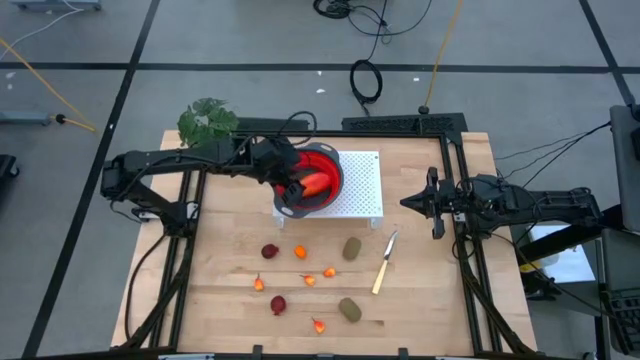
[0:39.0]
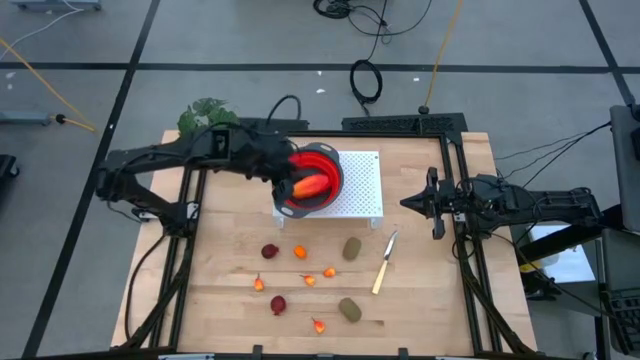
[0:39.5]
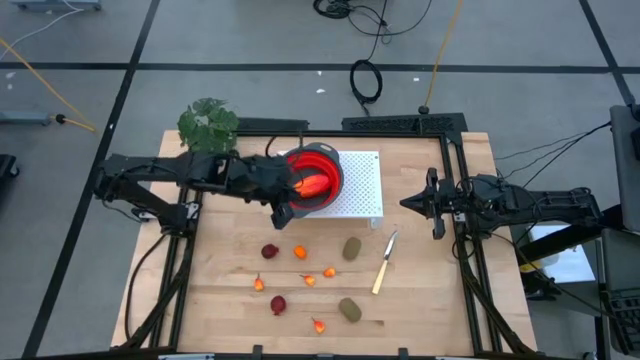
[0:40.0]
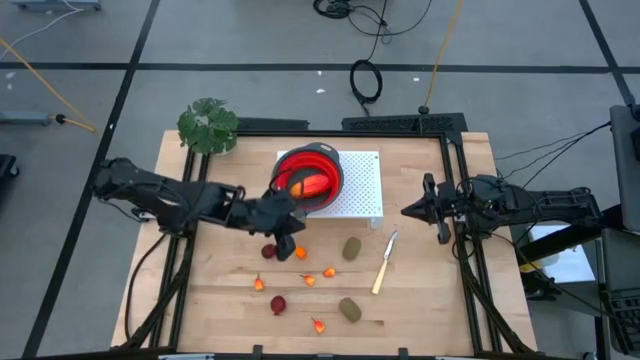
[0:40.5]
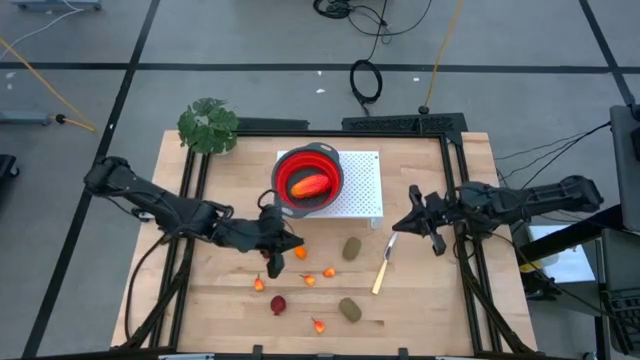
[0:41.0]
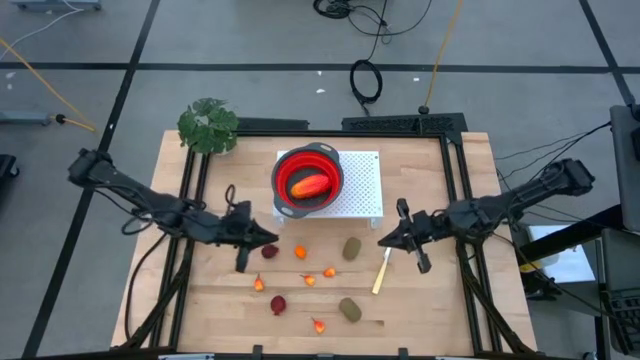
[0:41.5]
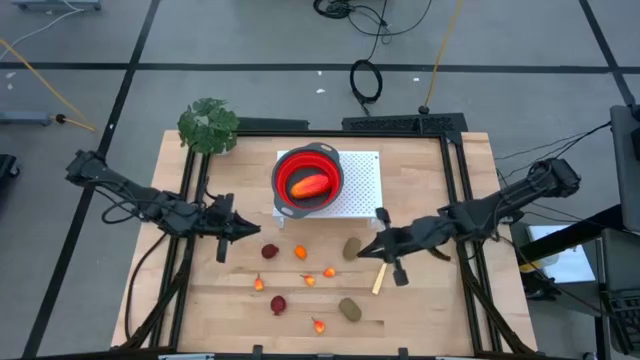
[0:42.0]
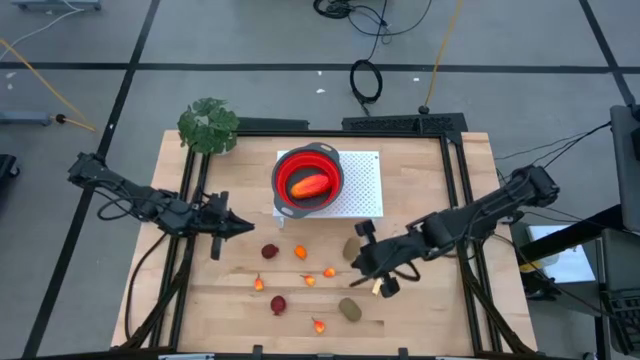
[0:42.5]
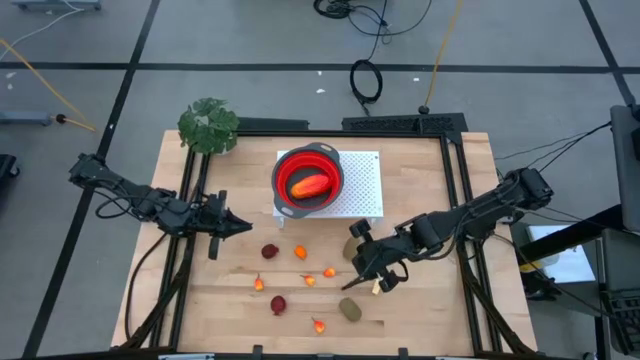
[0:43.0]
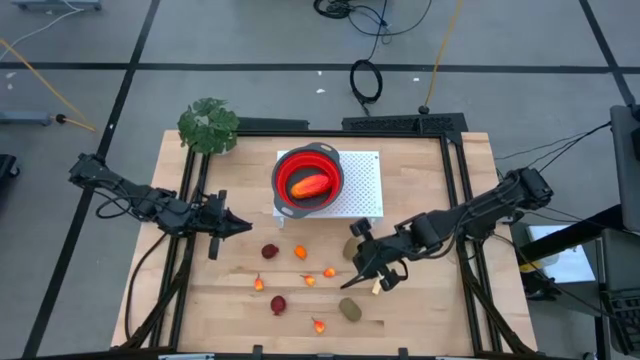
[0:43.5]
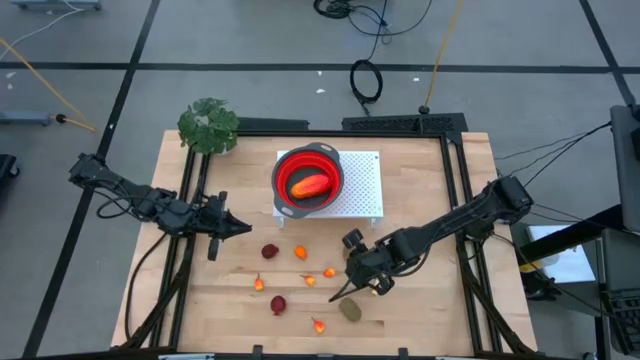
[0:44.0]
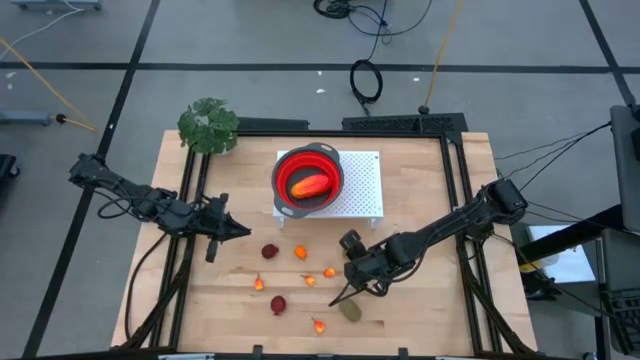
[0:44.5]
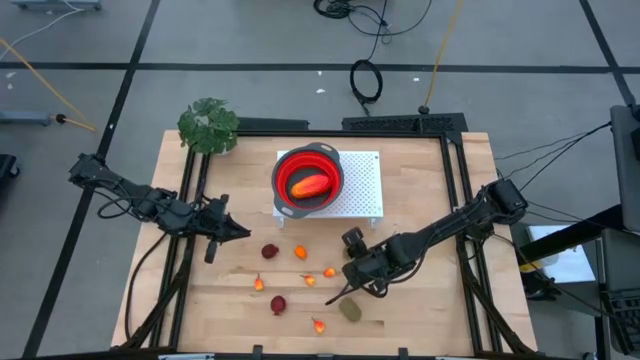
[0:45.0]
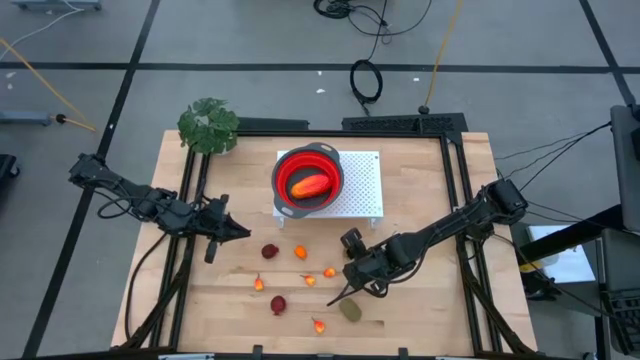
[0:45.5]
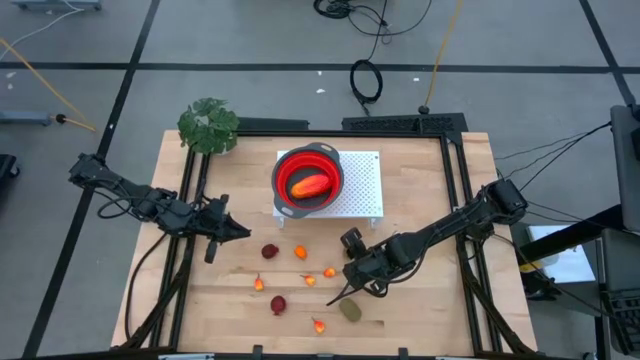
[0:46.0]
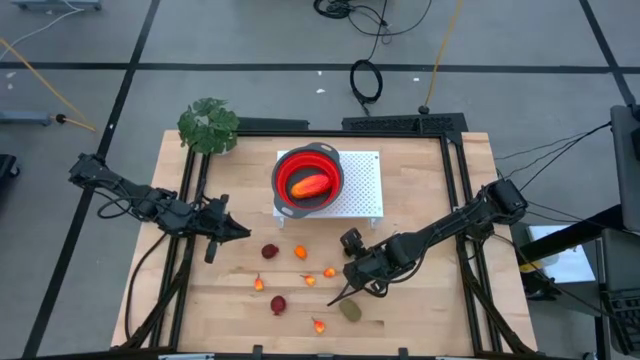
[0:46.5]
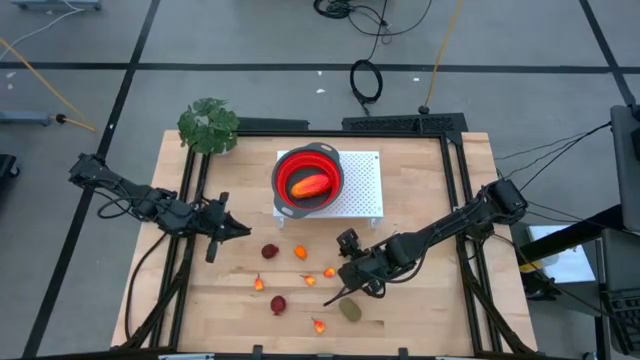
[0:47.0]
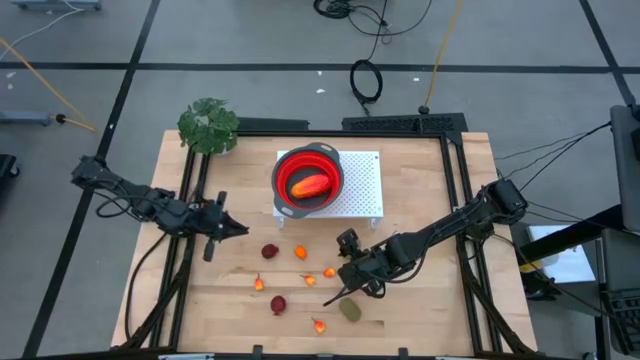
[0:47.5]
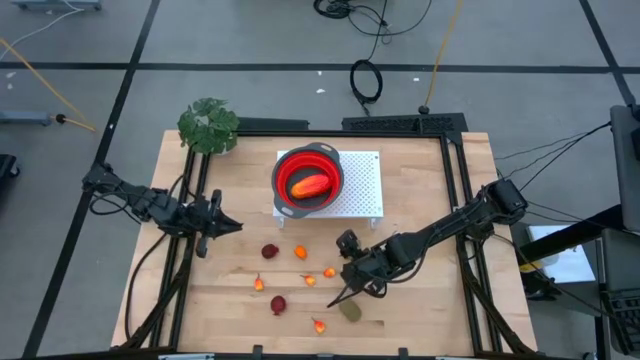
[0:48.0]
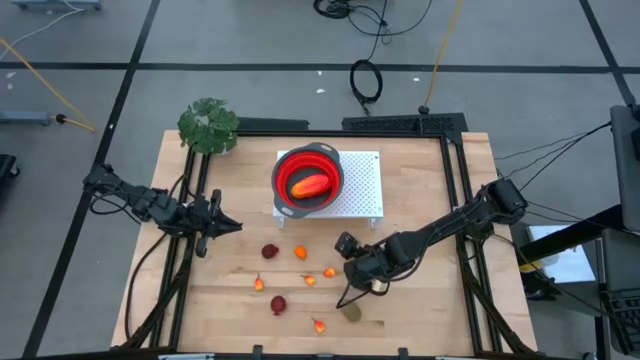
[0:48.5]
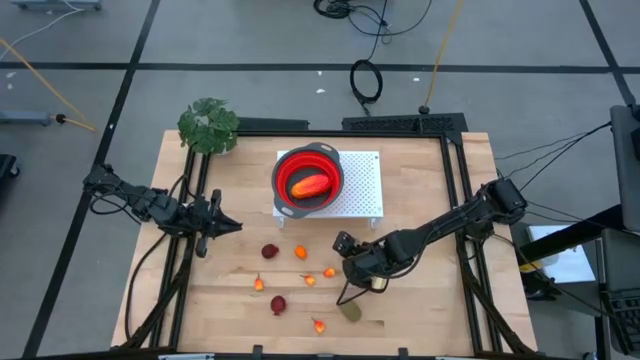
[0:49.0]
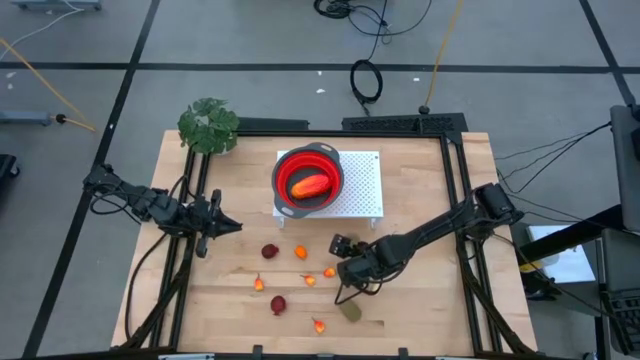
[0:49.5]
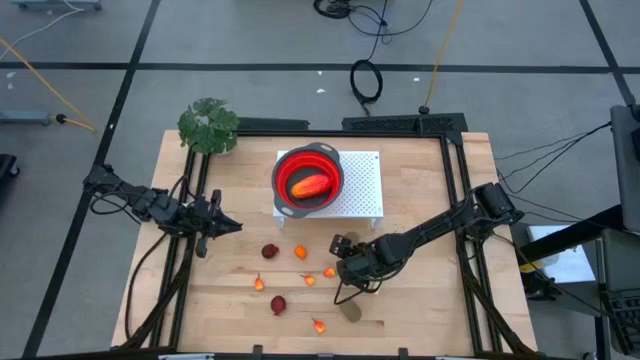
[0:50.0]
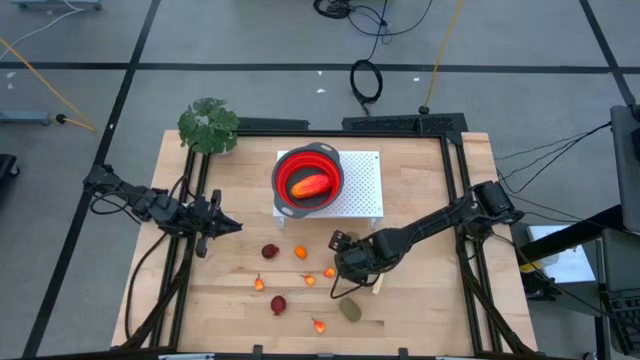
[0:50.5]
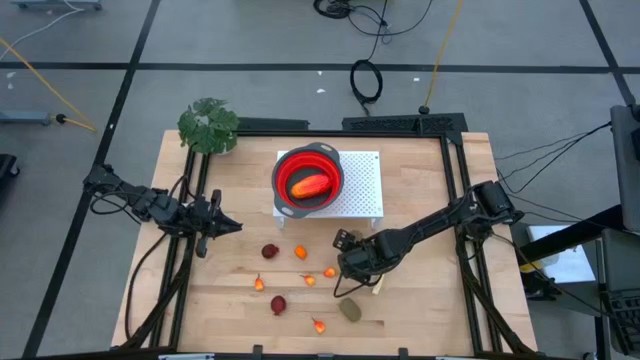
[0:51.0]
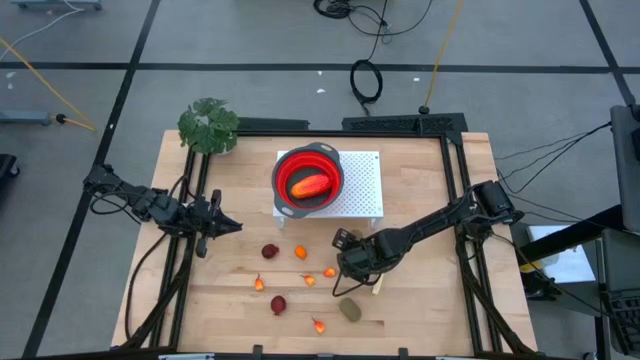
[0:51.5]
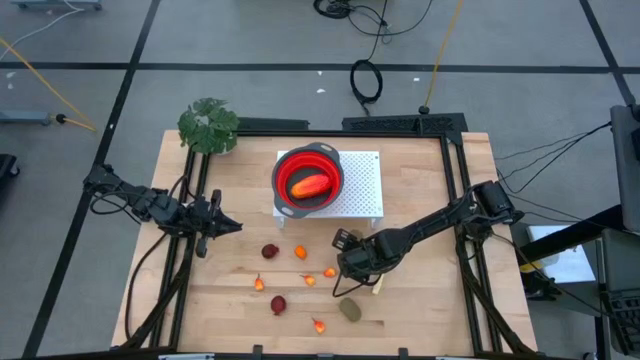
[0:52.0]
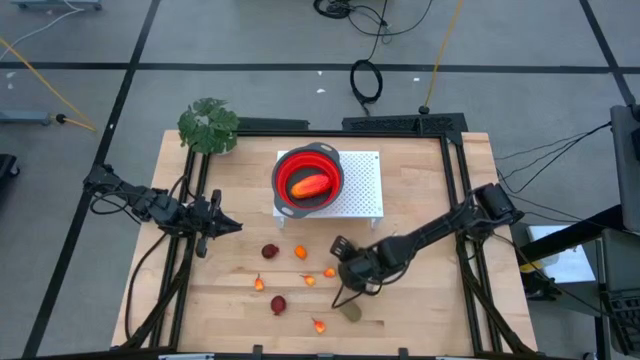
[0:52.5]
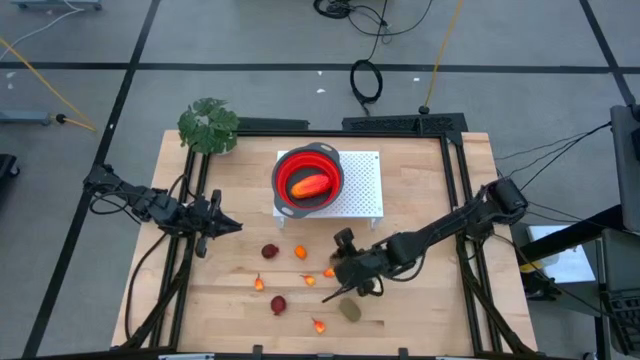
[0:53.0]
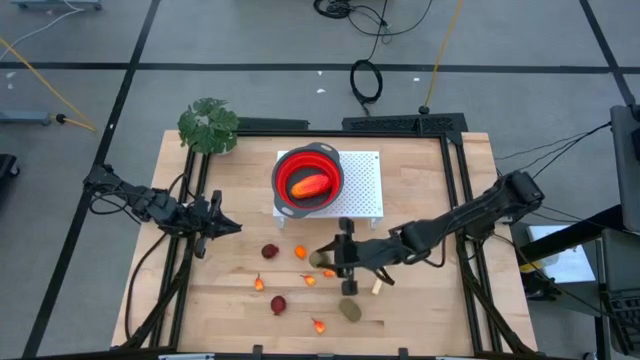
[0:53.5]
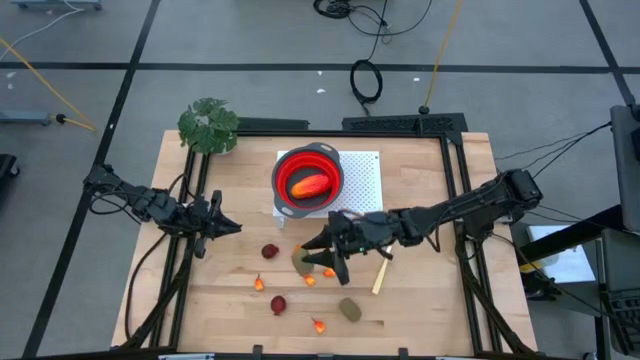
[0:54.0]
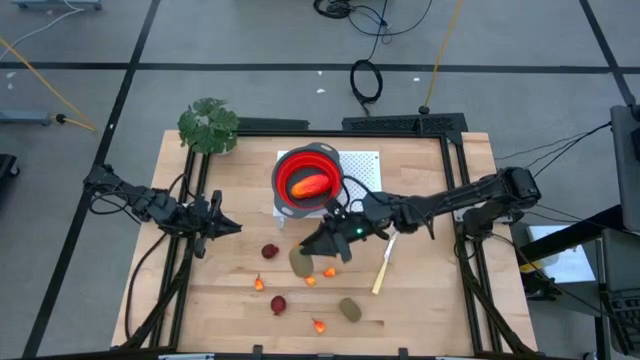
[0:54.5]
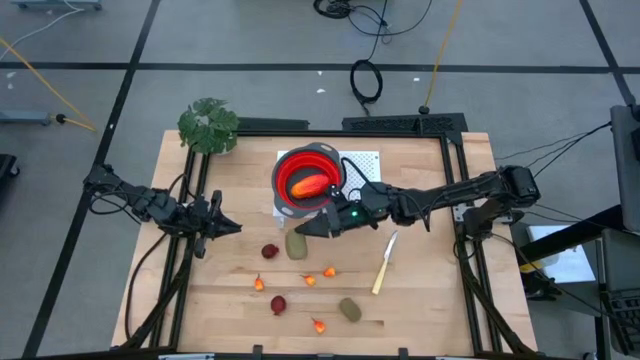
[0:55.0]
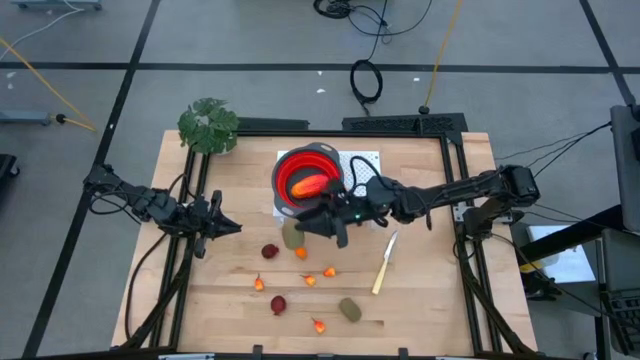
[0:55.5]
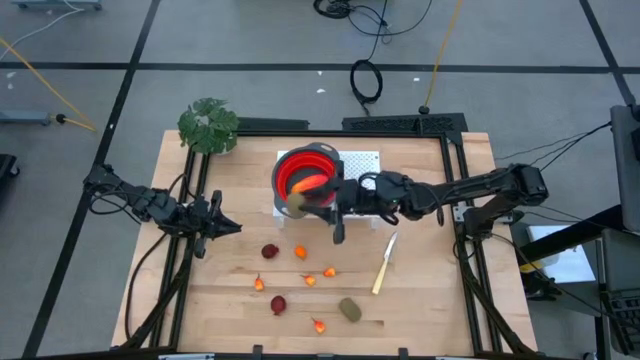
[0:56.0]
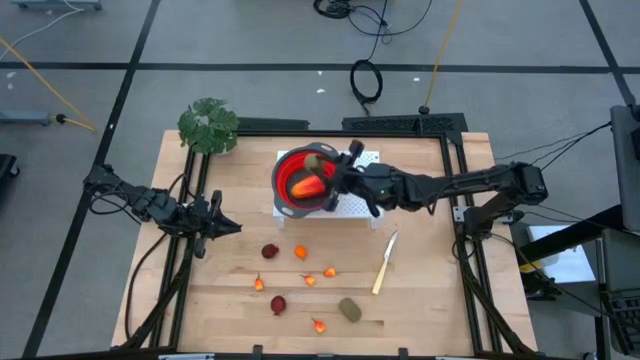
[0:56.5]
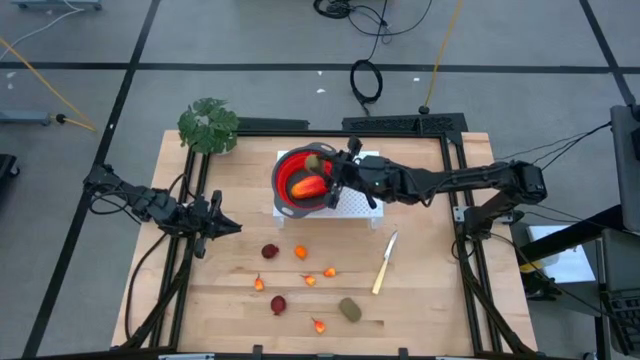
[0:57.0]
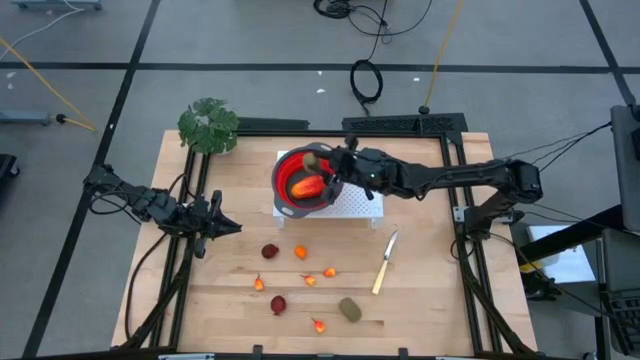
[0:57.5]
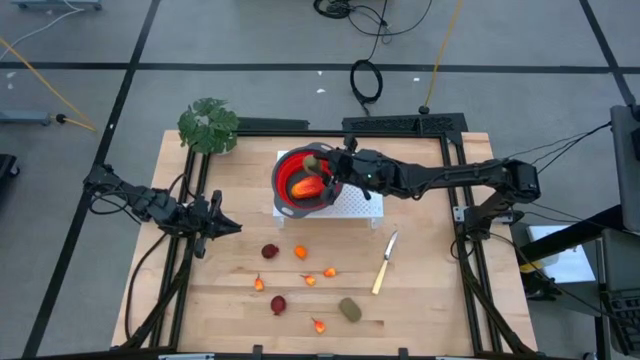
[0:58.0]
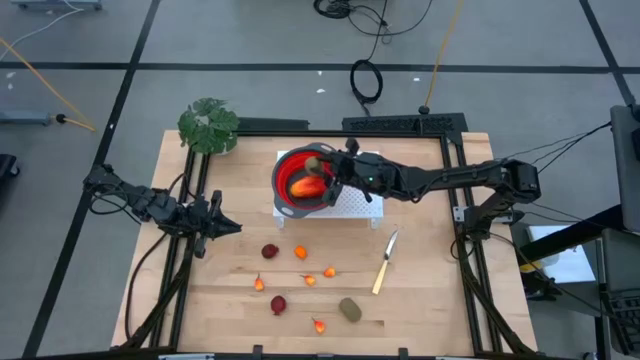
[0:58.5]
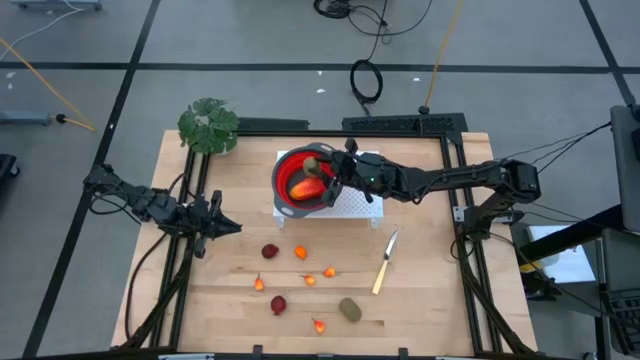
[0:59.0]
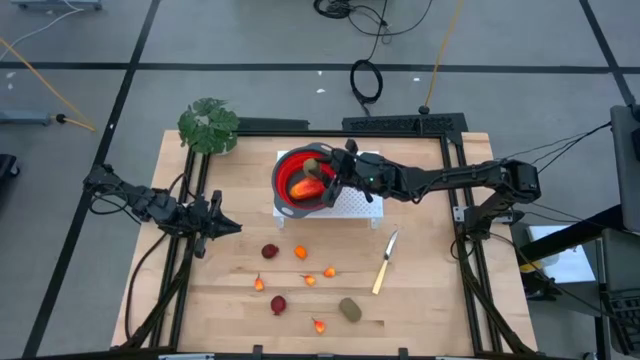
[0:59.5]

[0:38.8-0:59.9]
Task: Pick & Place Fruit
Put the brown kiwi into the orange strainer bowl on the shelf

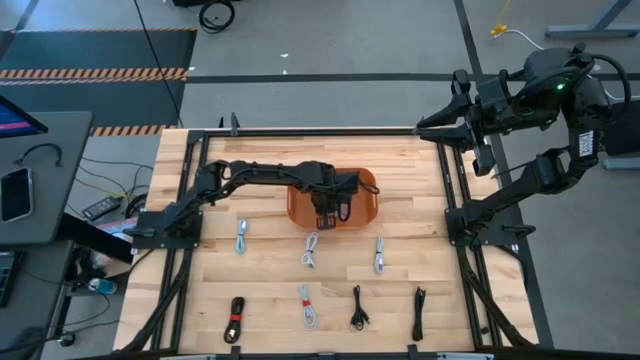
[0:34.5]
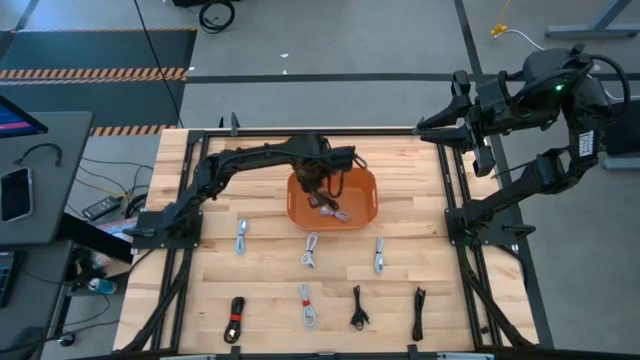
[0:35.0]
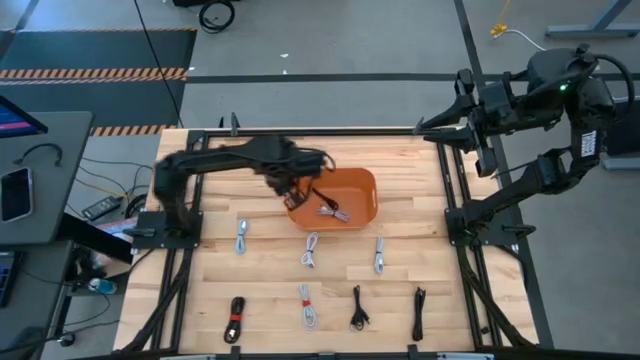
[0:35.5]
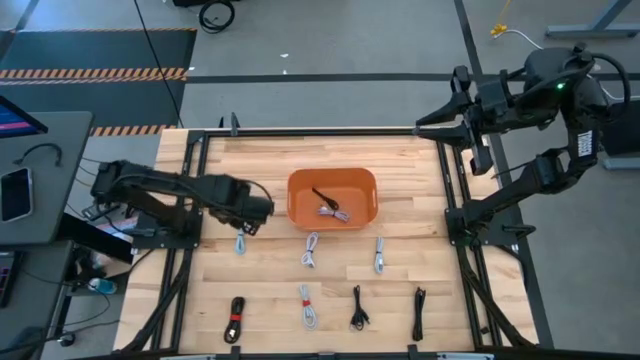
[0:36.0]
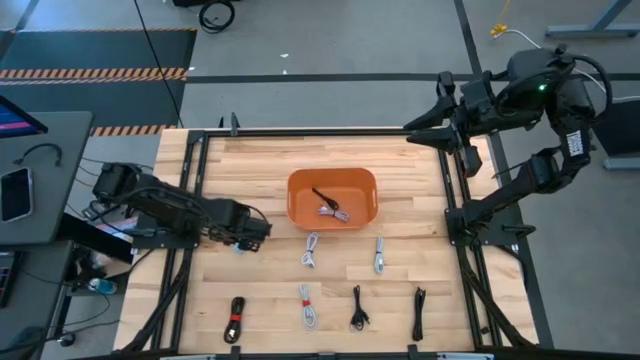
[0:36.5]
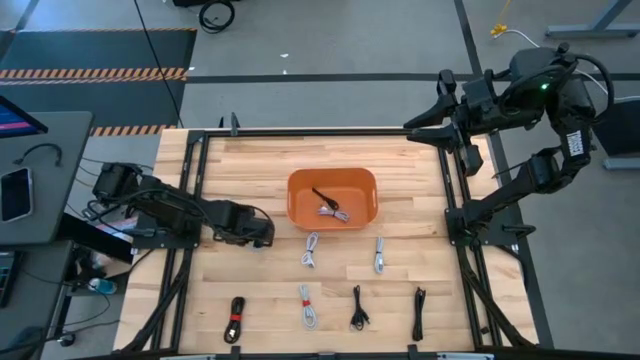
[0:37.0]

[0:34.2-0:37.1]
Task: Pick and place USB-C Cables
Put the blue USB cable into the orange bin
